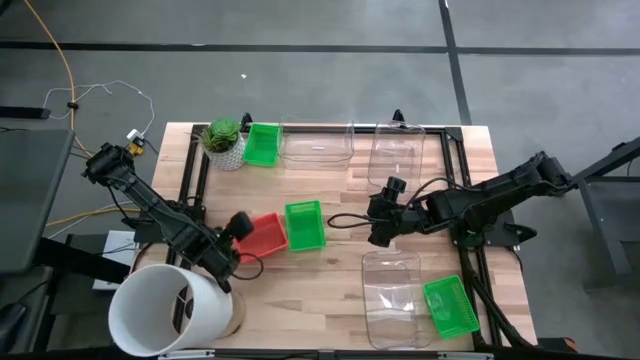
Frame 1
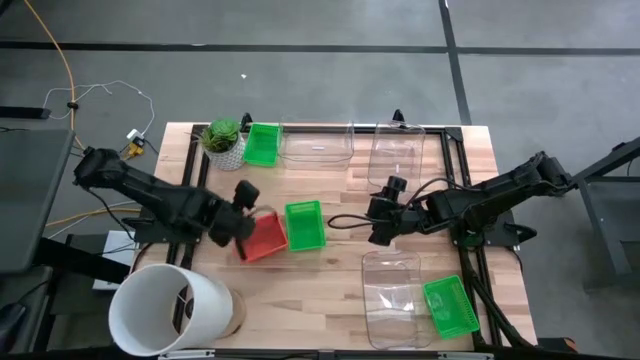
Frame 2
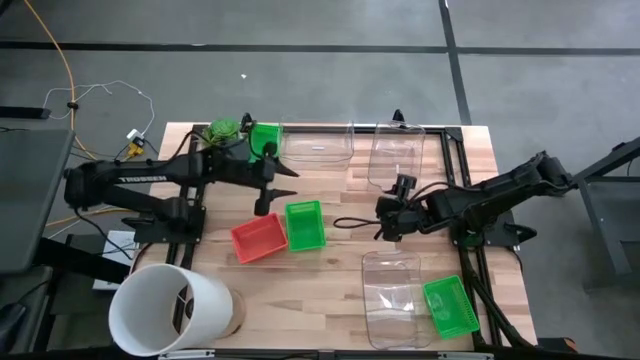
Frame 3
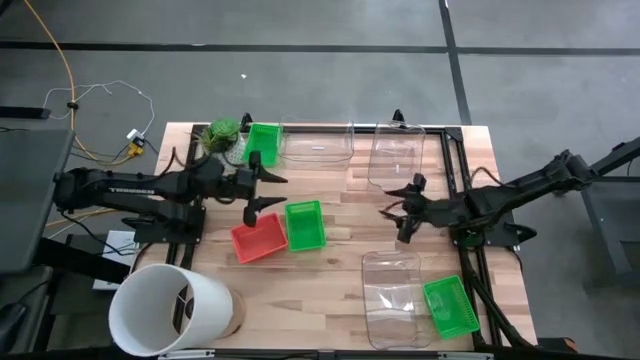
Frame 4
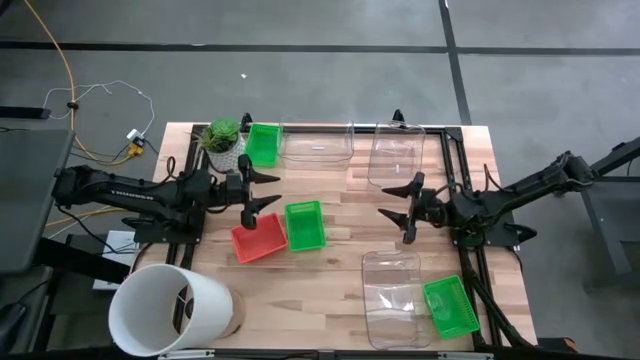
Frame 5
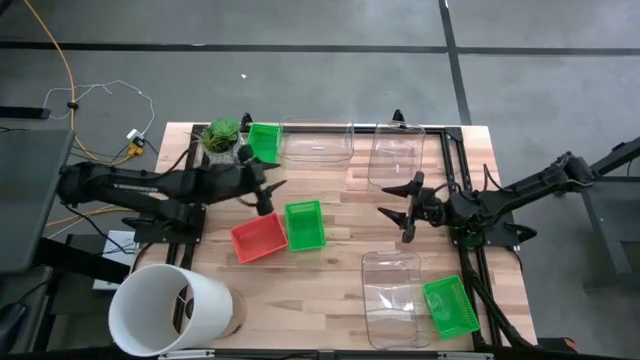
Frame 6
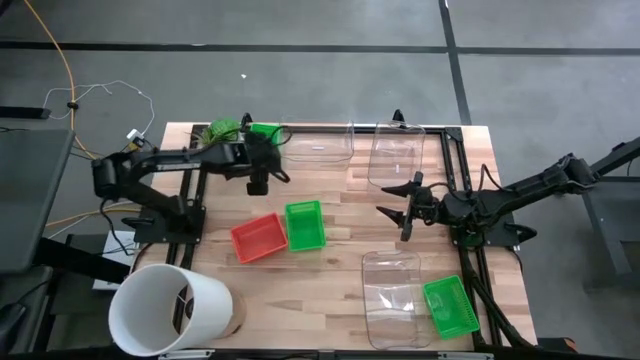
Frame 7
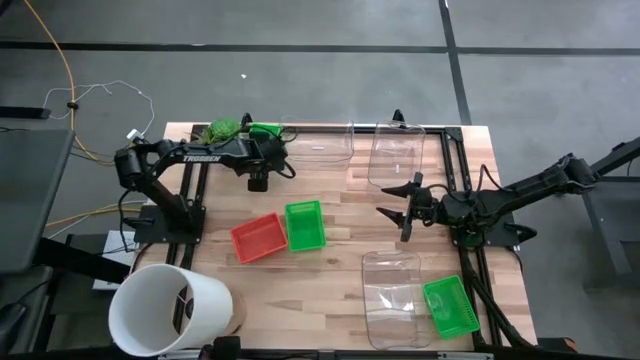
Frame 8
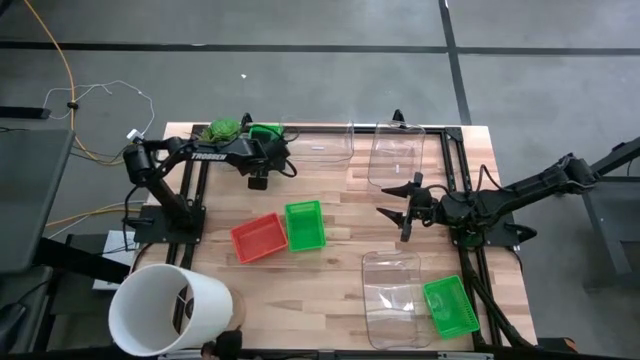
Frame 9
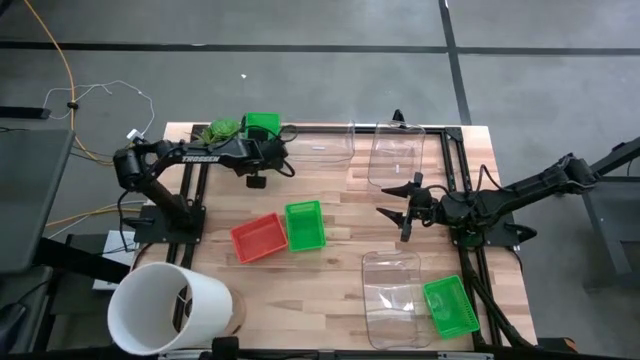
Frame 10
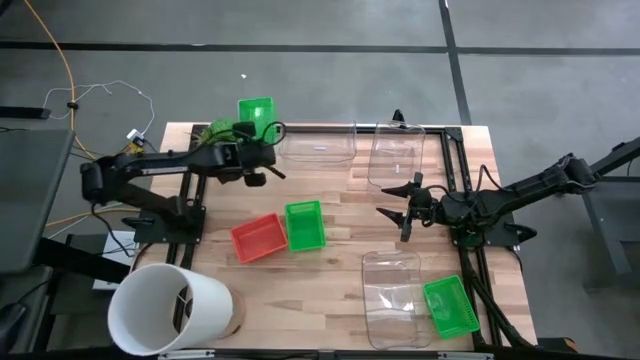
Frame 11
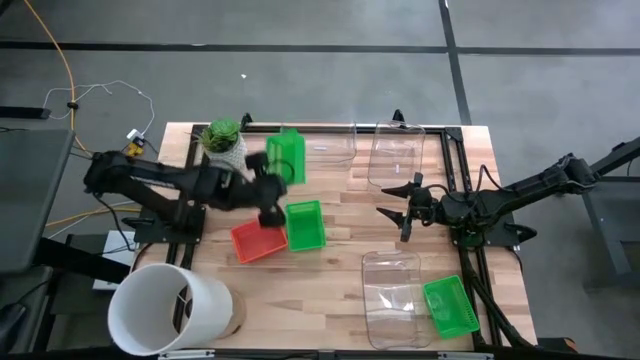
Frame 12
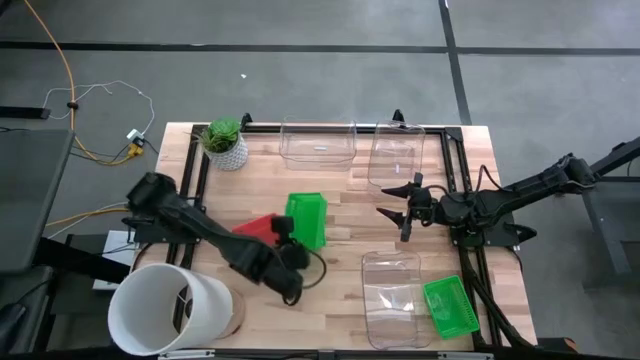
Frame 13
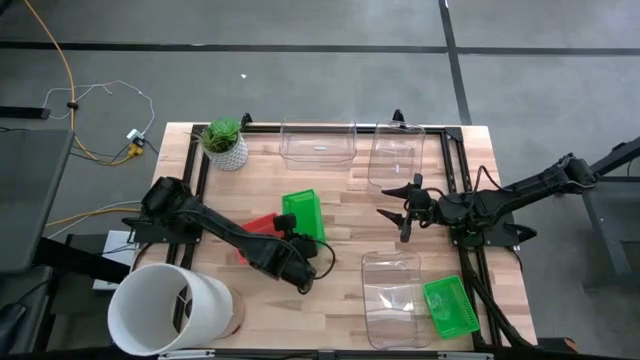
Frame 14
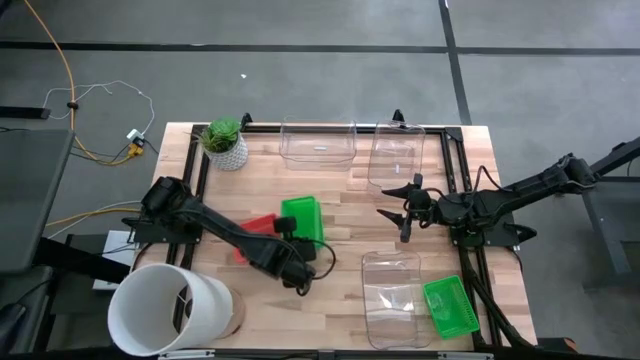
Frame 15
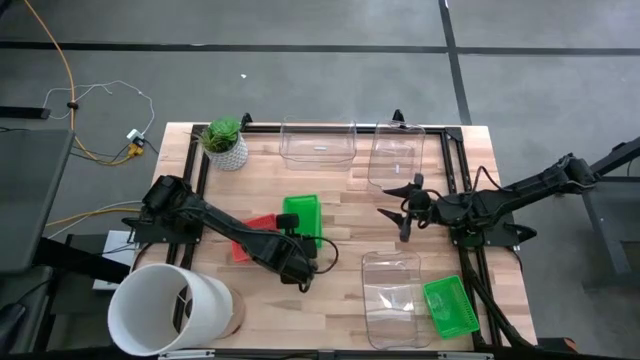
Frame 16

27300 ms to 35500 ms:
Stack the top green bin on top of the middle green bin

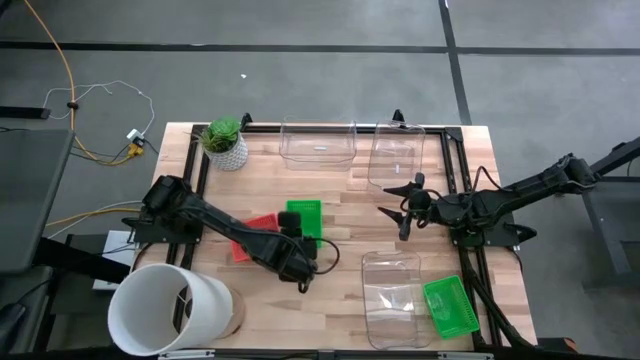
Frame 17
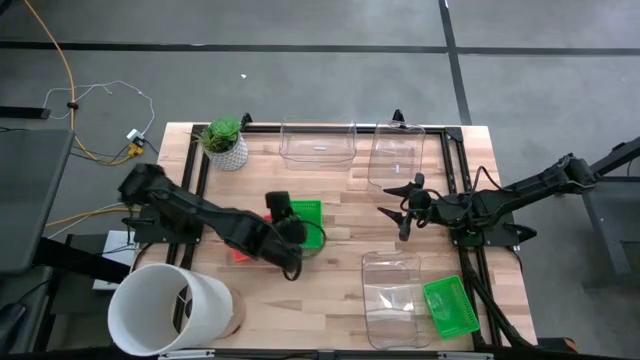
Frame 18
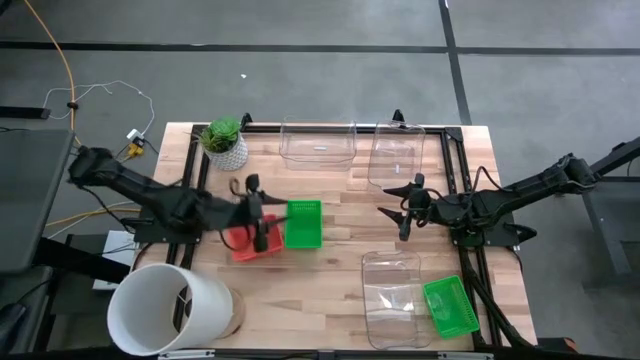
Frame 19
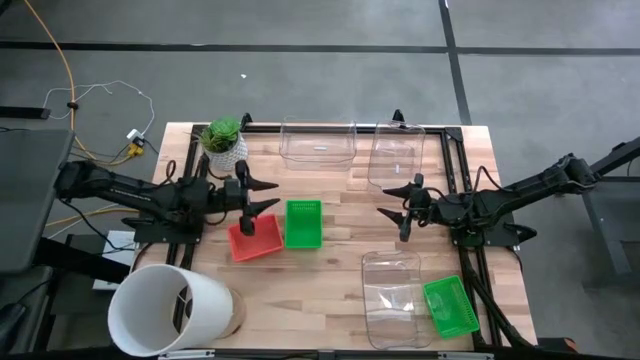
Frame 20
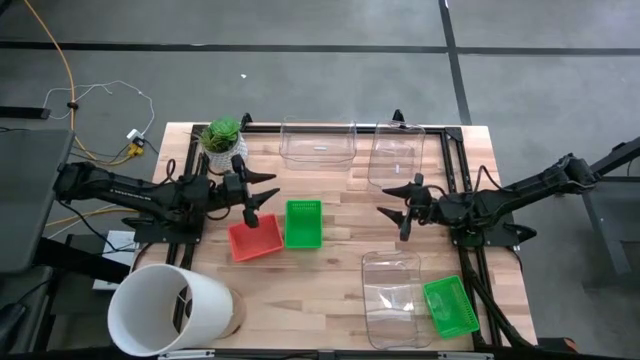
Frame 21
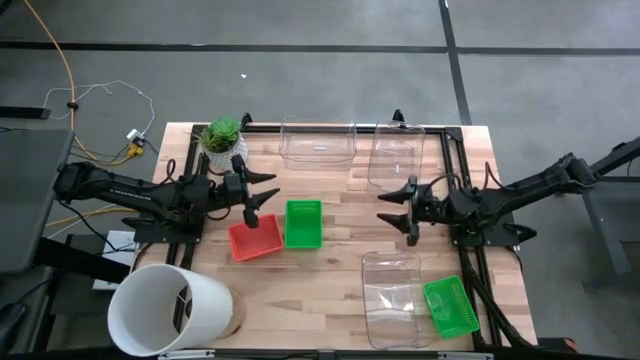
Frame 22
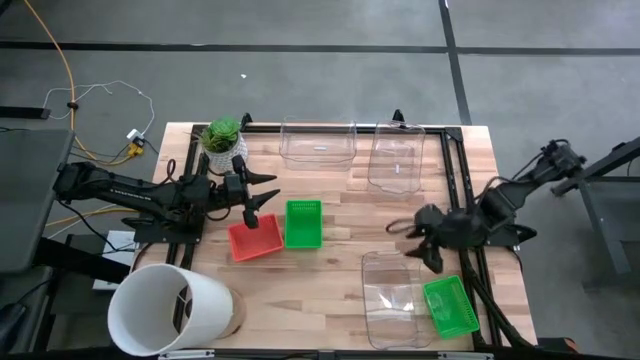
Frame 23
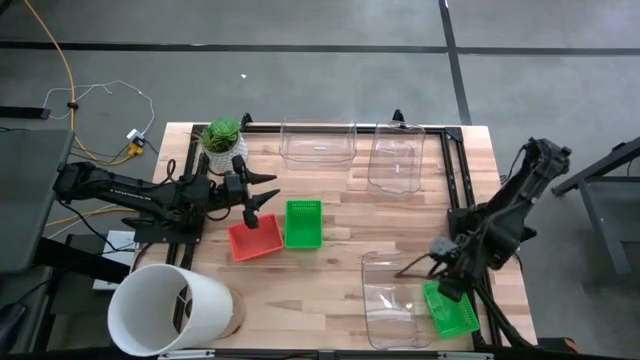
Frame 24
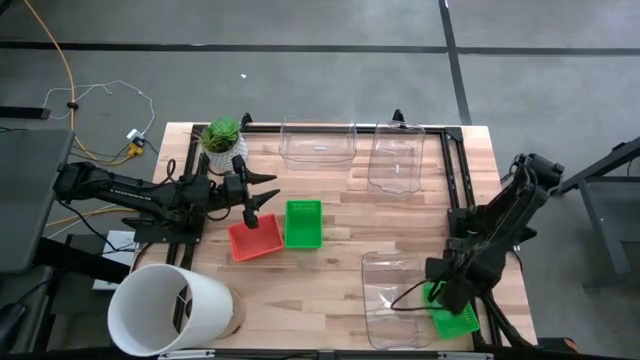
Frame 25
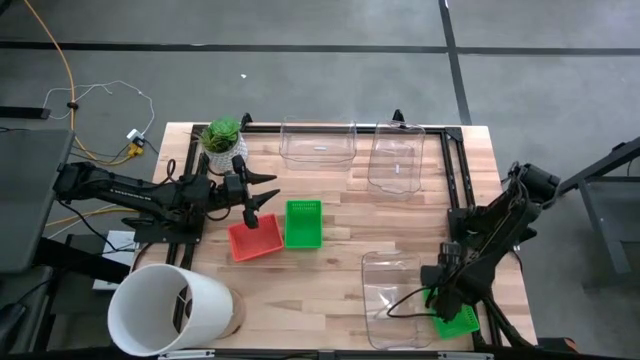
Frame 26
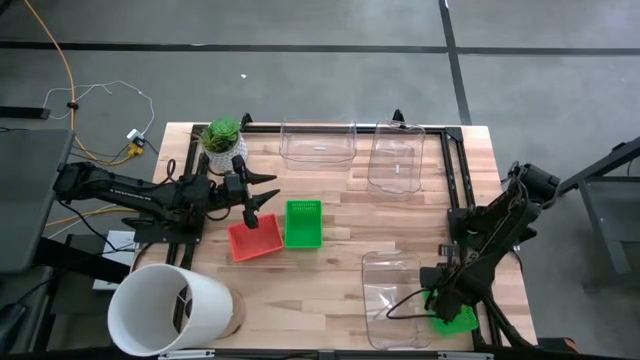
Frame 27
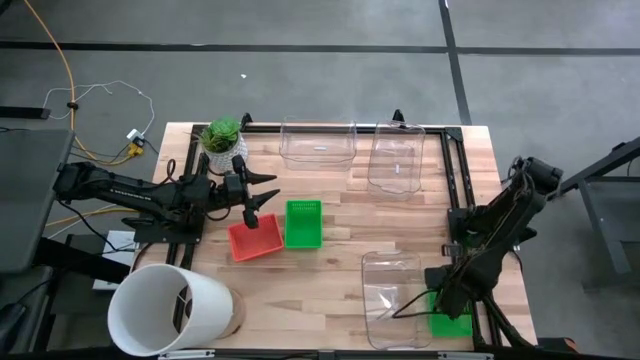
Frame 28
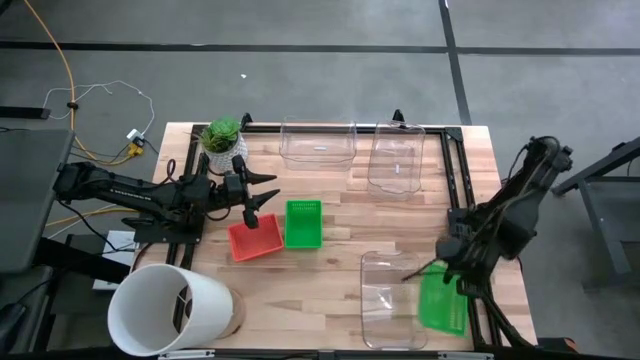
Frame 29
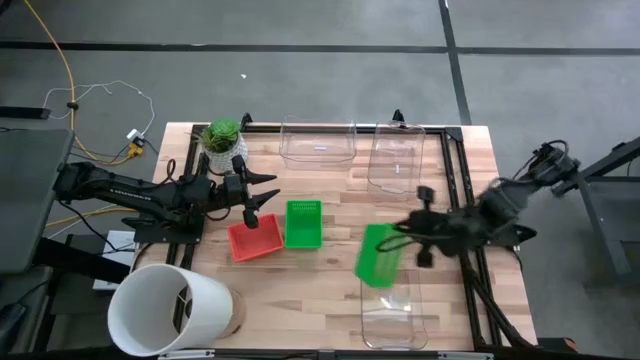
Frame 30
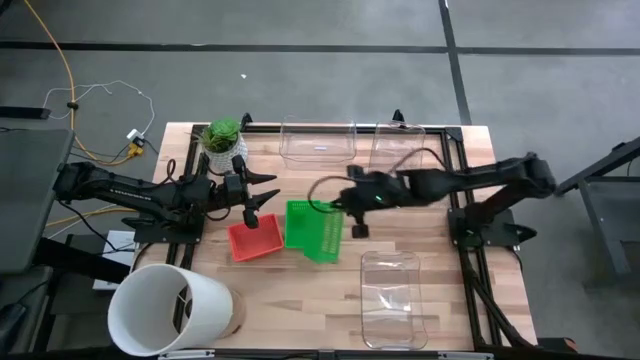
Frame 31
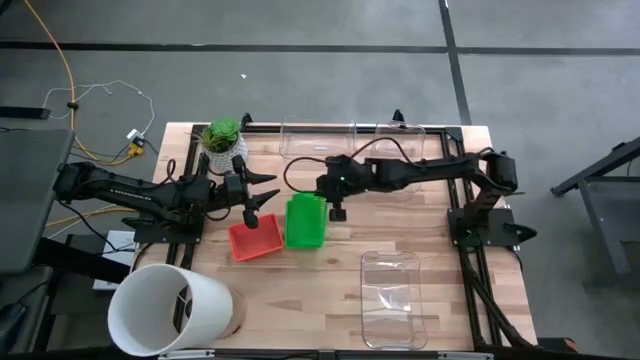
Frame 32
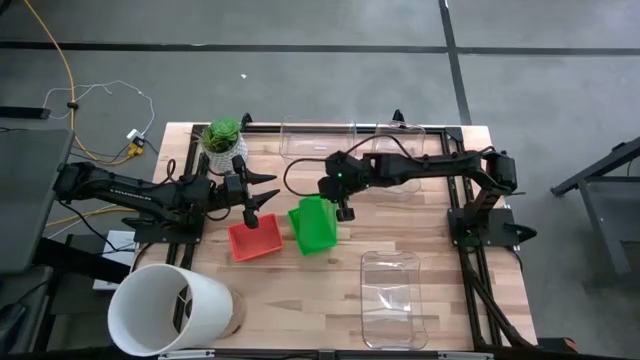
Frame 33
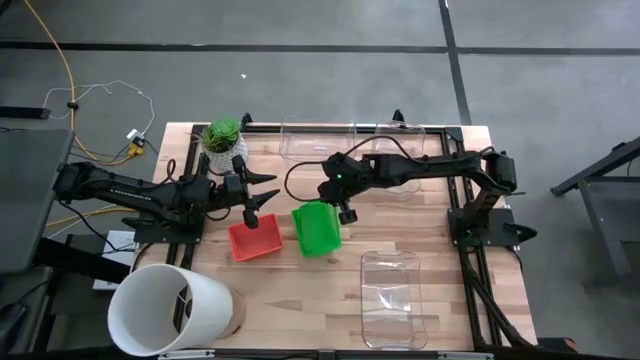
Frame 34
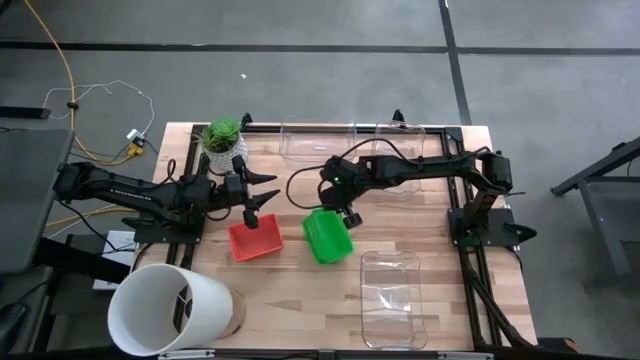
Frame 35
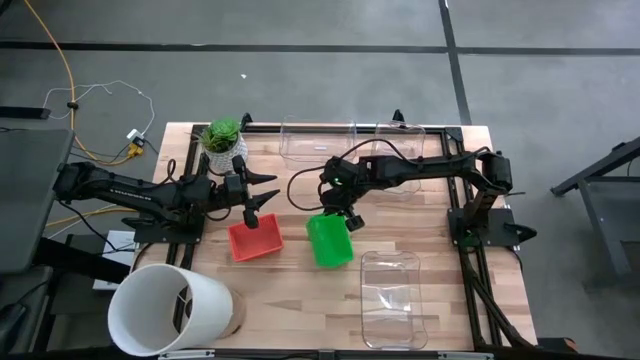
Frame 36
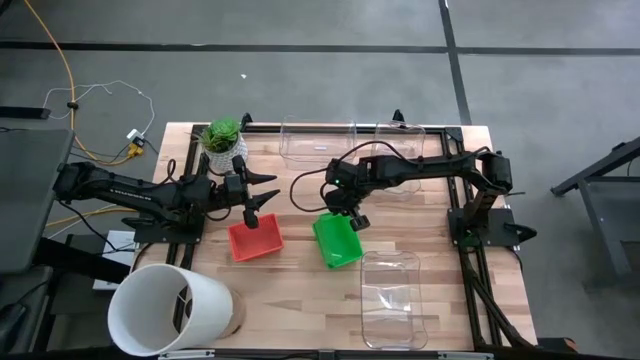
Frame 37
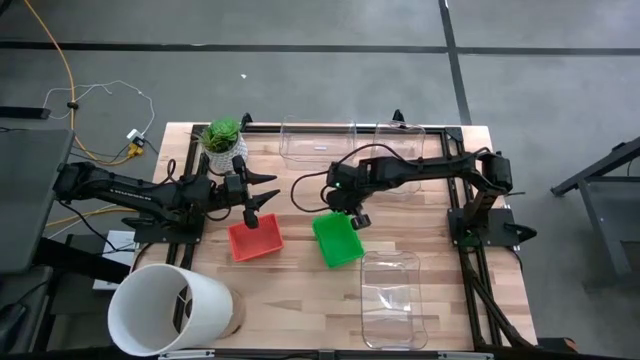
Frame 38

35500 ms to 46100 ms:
Stack the right green bin on top of the top green bin
